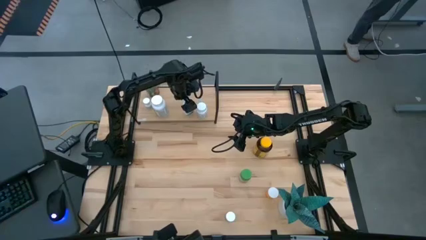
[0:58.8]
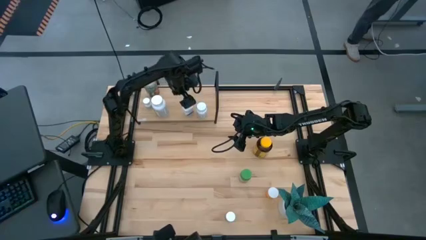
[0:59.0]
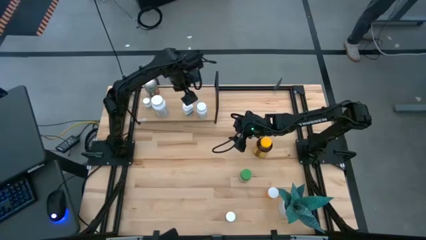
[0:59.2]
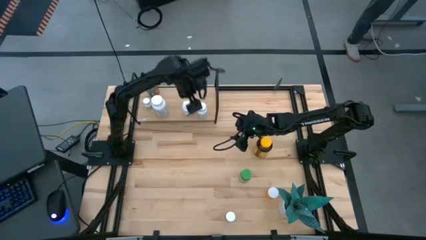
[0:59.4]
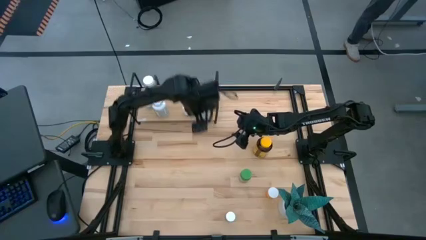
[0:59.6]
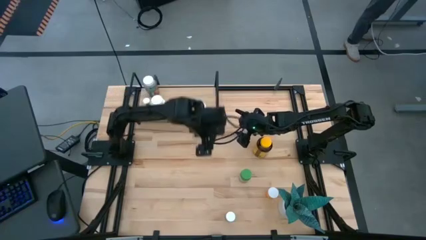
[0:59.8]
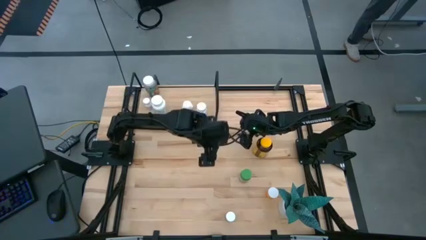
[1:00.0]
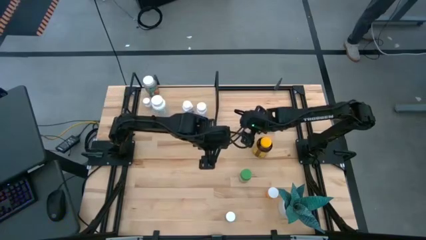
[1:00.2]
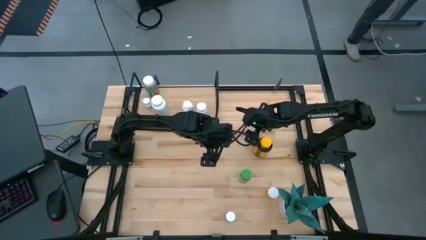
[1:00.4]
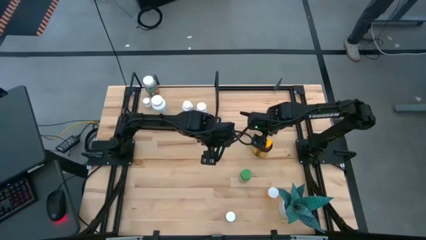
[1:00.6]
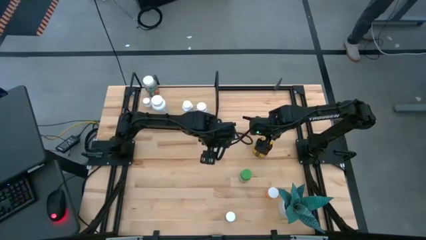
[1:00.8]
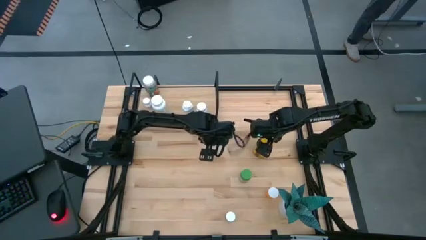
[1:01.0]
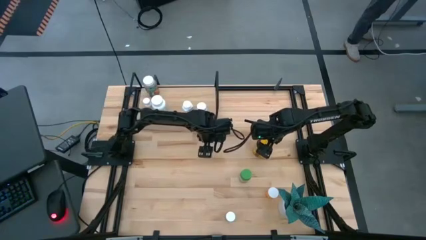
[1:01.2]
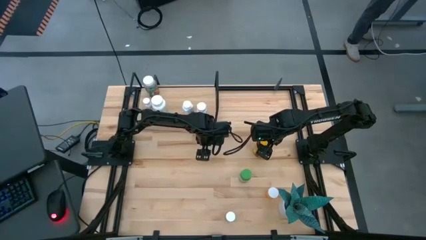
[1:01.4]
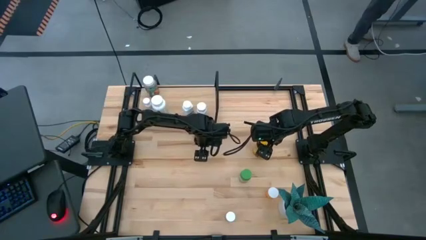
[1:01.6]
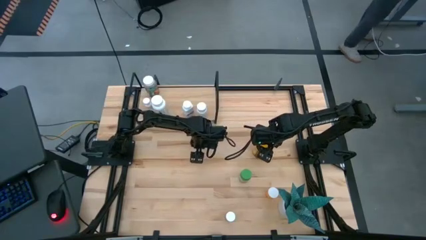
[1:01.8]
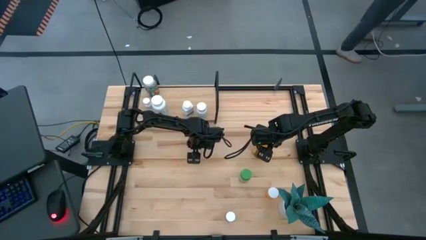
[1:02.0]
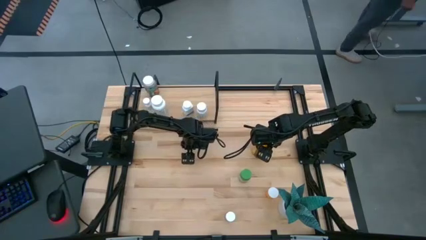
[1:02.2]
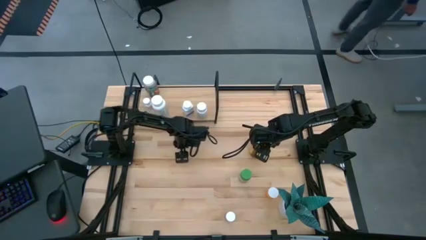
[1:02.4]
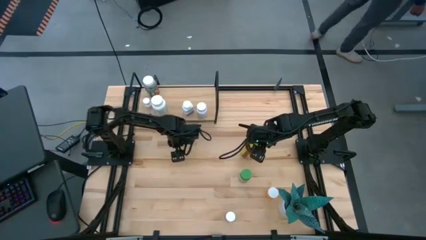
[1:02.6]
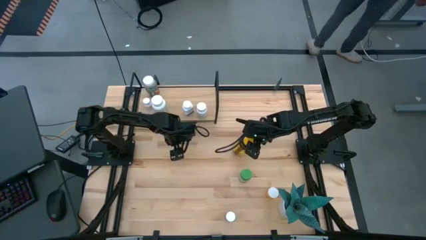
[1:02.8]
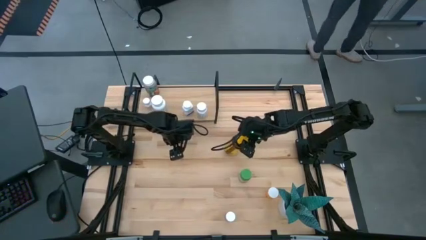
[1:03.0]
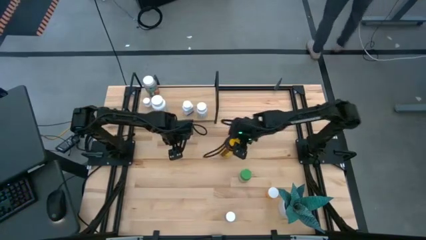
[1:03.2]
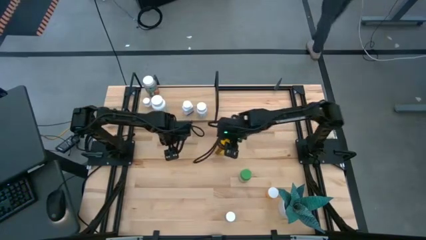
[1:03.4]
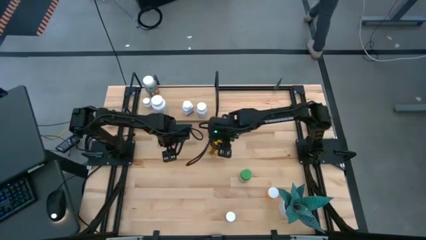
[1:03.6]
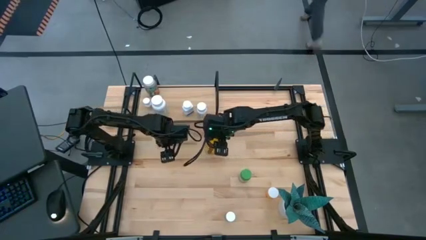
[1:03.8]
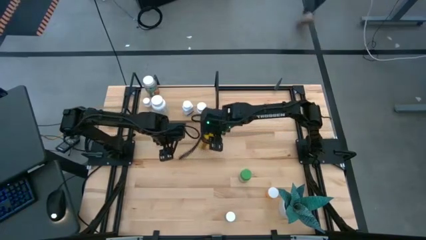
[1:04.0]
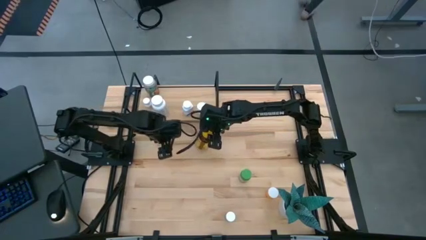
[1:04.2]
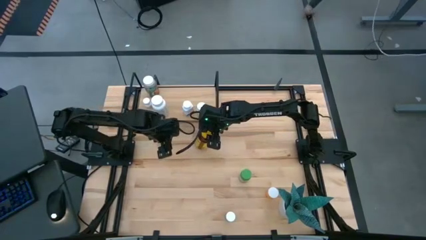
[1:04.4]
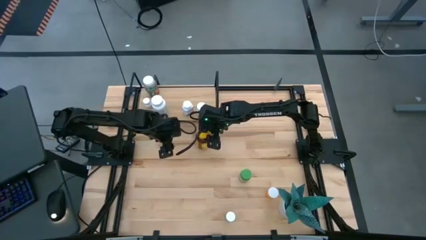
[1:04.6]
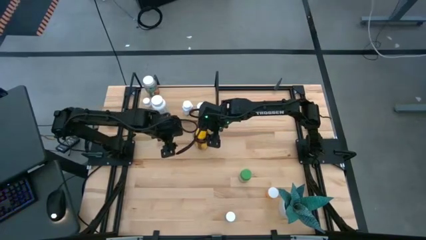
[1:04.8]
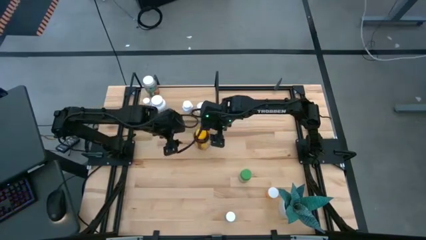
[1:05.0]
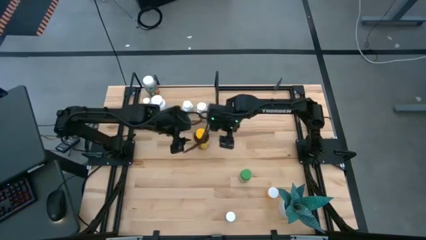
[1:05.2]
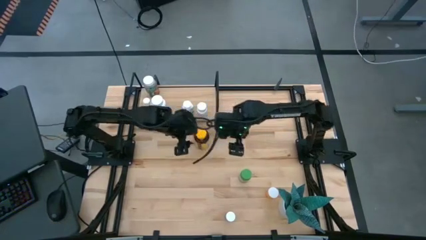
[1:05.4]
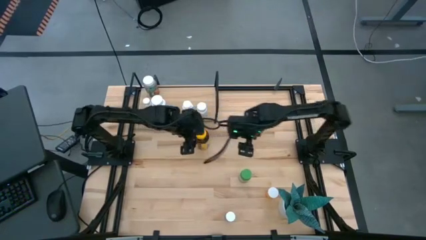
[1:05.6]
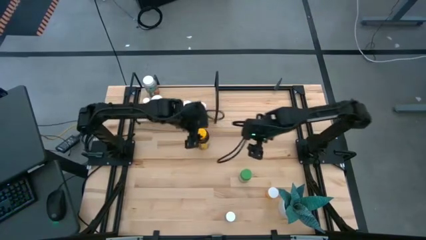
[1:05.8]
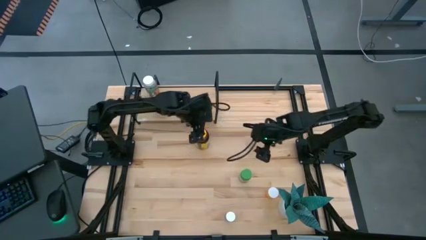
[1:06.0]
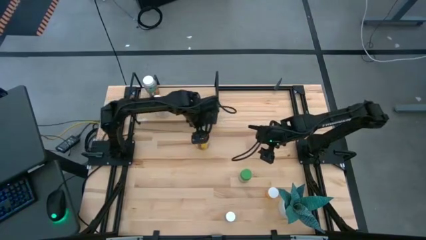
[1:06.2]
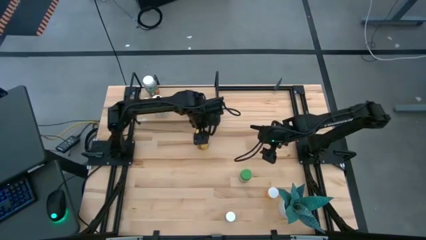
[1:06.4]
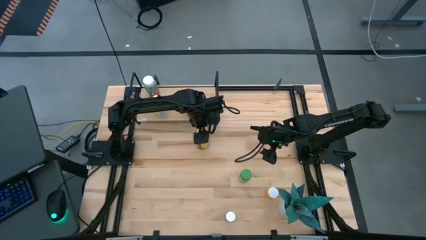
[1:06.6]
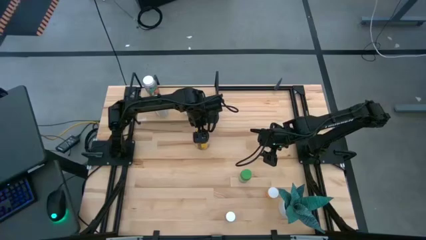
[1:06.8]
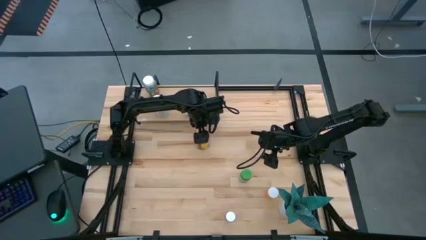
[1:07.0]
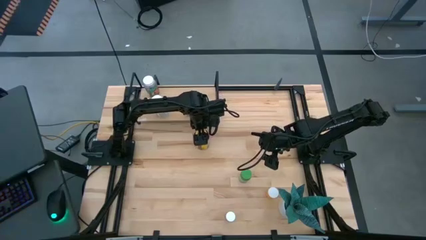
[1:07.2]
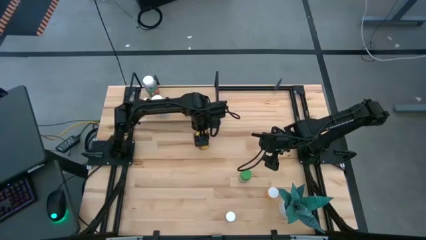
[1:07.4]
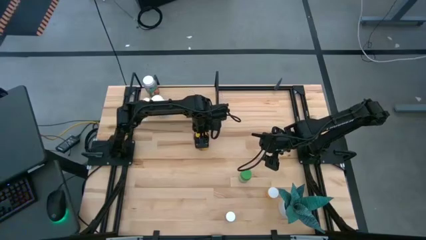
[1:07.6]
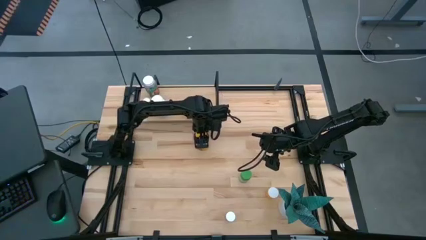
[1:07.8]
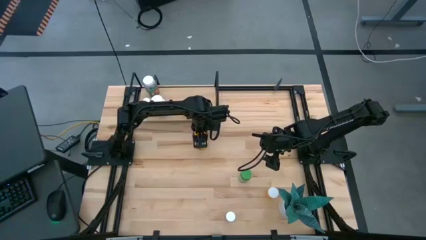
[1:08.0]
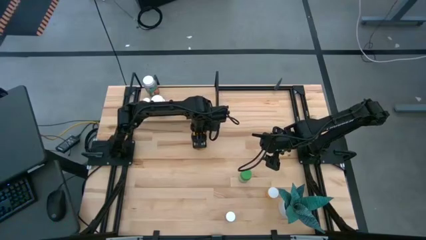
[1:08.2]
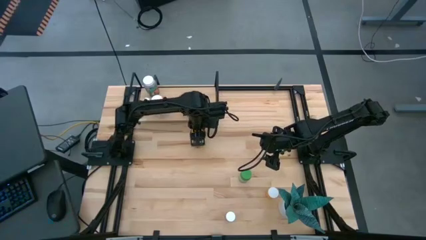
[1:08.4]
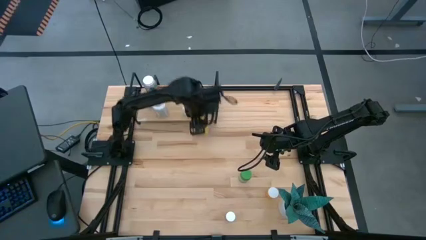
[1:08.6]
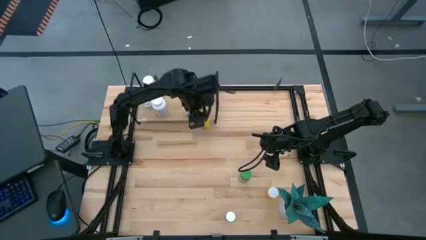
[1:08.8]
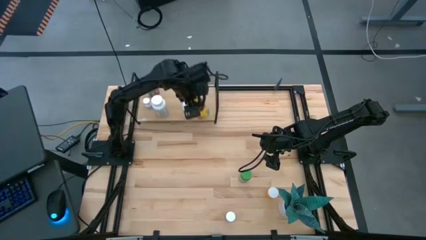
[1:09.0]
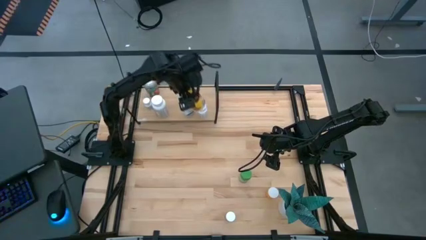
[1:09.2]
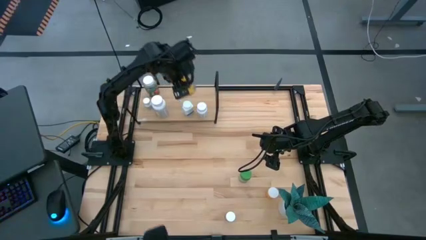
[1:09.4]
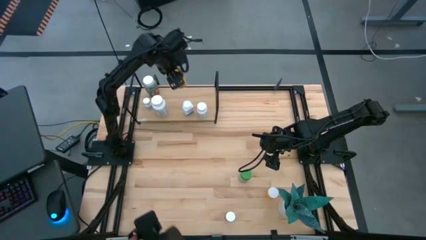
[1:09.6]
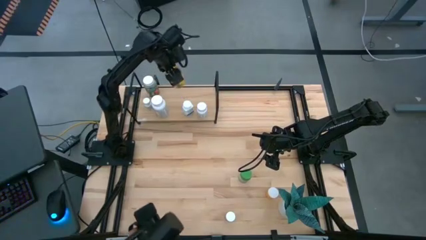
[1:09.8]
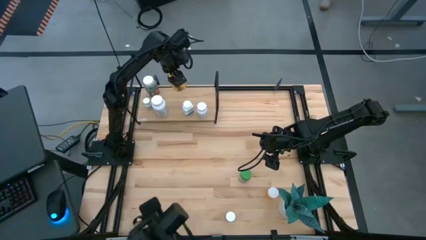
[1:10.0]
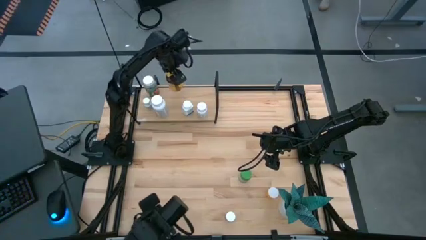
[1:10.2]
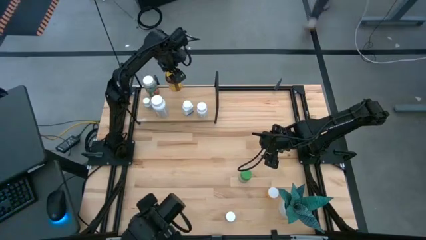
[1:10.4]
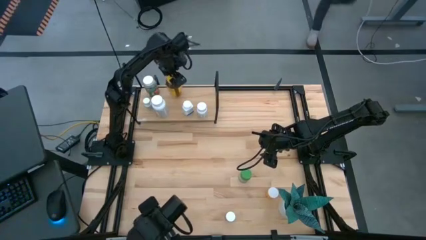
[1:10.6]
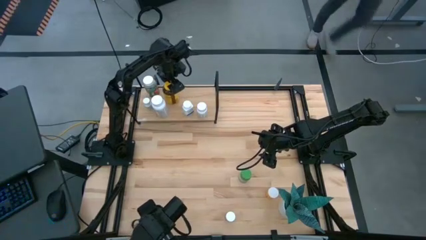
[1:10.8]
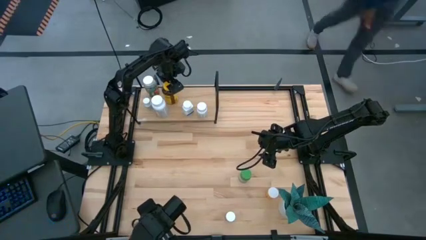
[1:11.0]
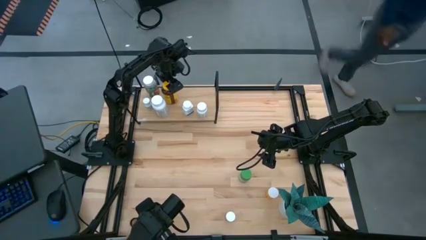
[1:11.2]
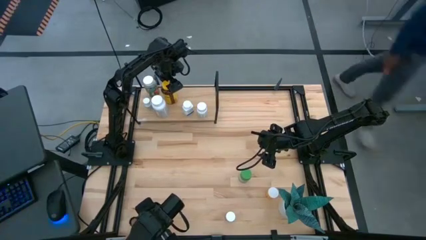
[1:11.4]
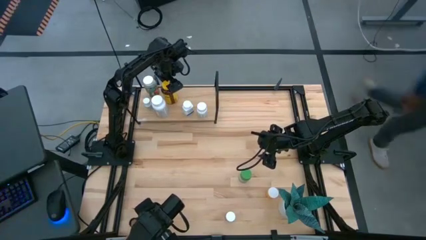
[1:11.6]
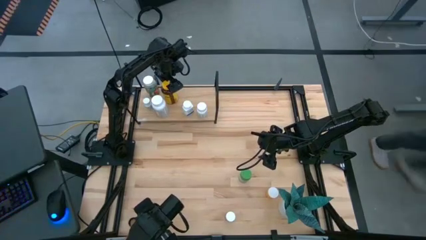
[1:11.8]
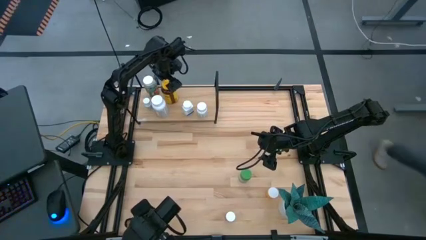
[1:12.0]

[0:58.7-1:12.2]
Task: Pick and place medicine bottles onto shelf by color
Put the yellow pill bottle on the shelf
